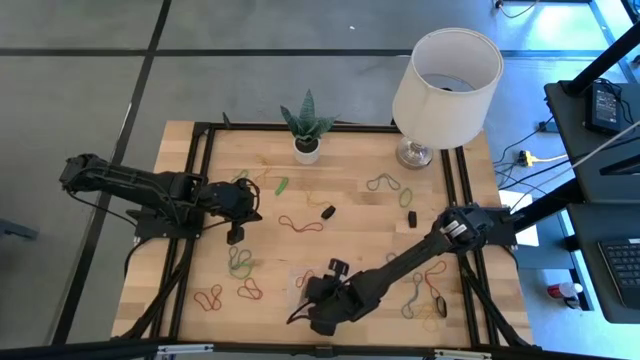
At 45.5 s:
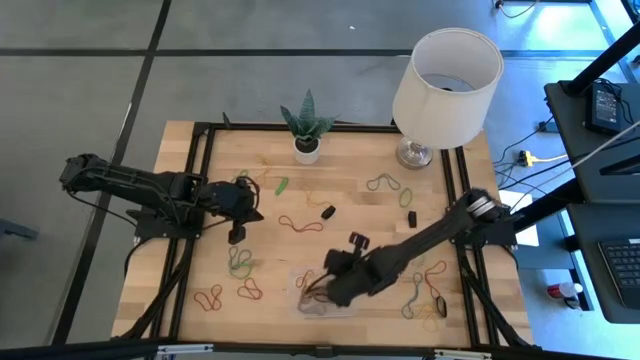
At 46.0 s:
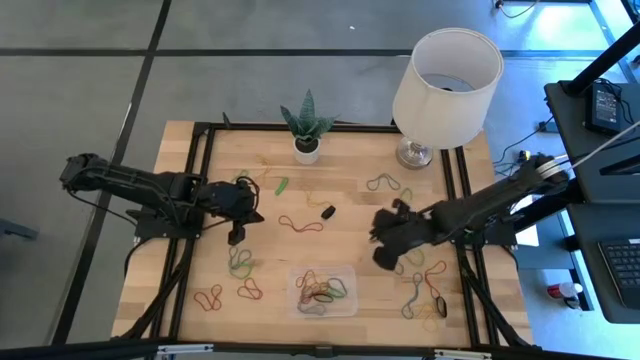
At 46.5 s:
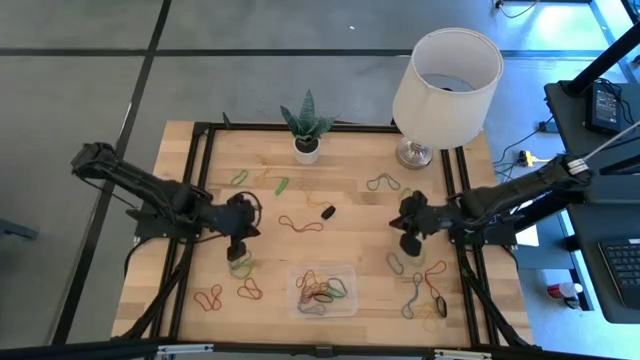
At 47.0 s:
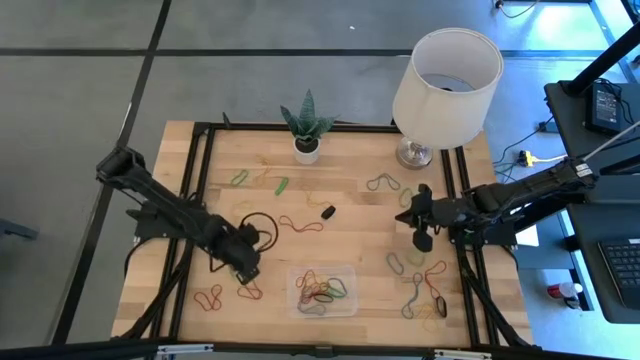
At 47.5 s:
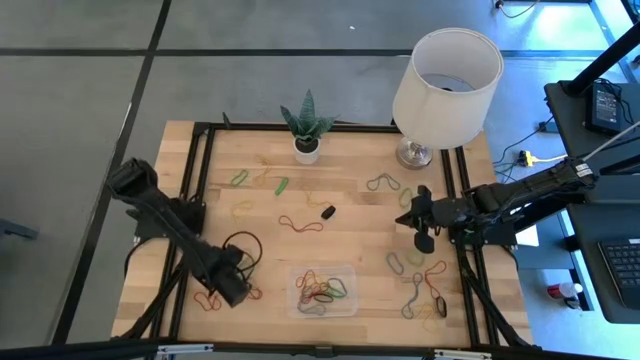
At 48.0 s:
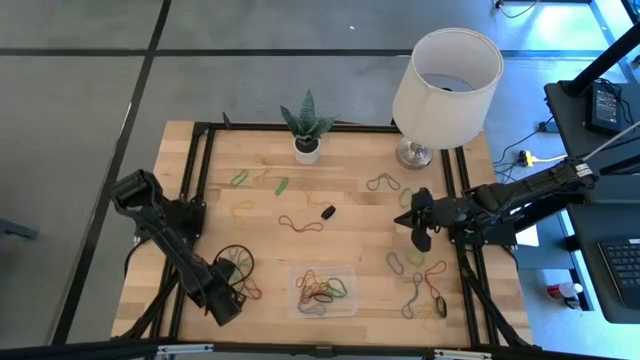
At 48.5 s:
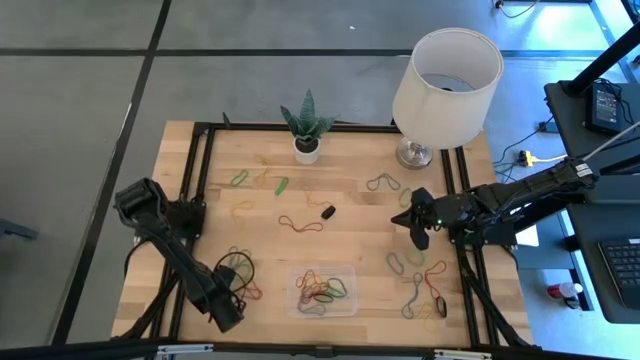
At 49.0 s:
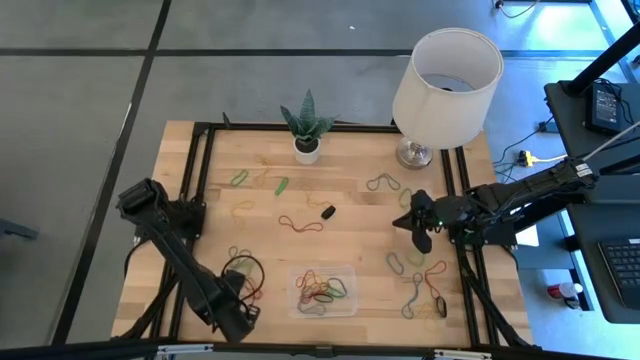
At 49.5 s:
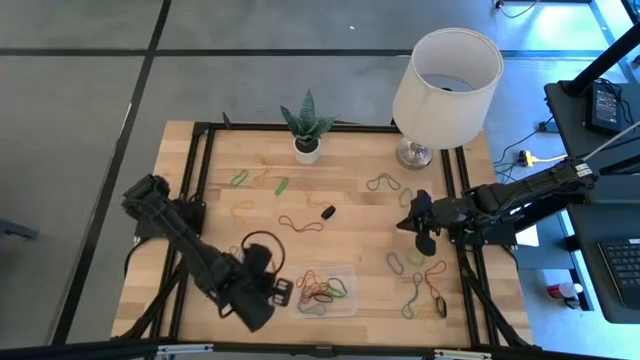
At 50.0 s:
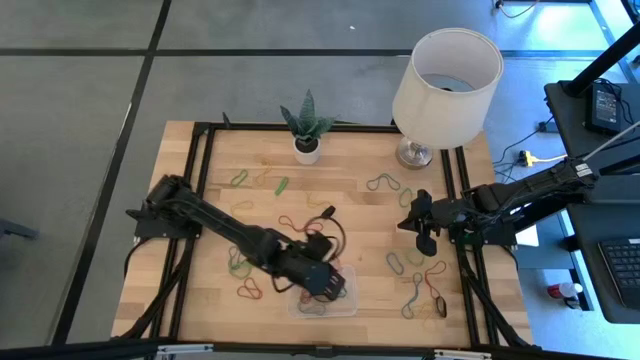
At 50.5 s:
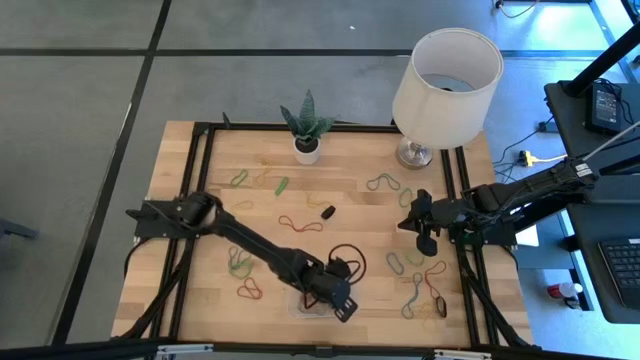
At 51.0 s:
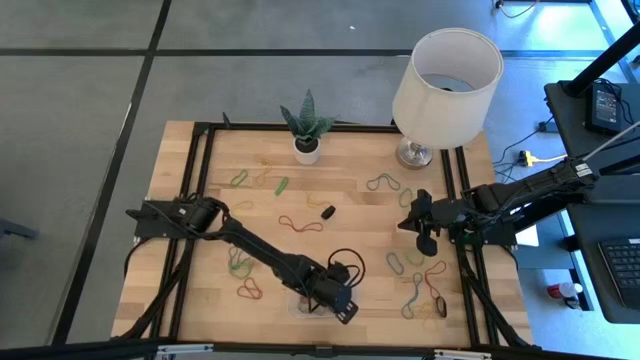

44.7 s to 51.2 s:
Task: Pick and place rubber bands into bin
Put the red rubber band into the transparent bin

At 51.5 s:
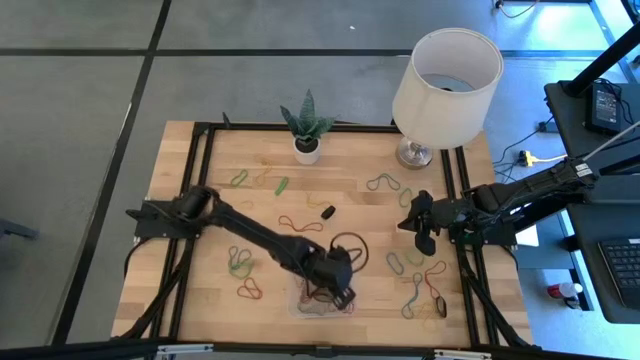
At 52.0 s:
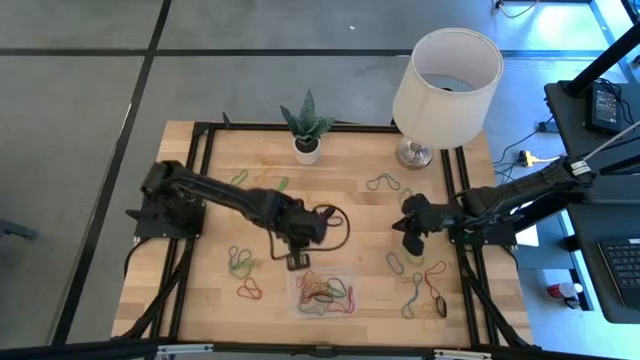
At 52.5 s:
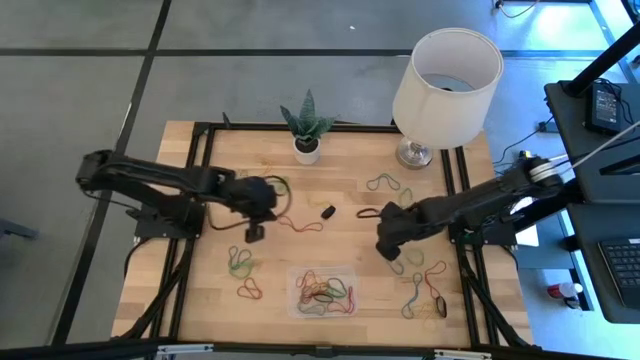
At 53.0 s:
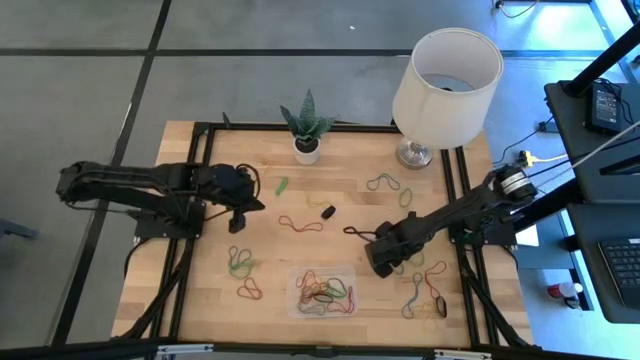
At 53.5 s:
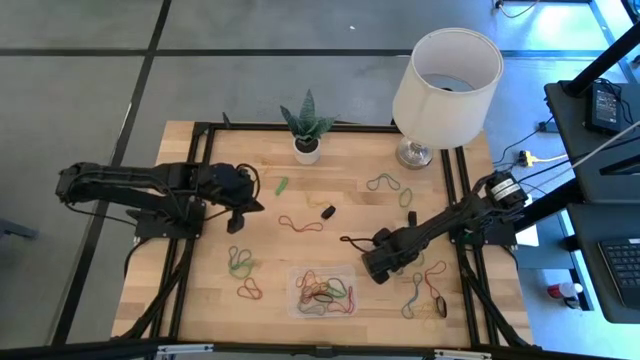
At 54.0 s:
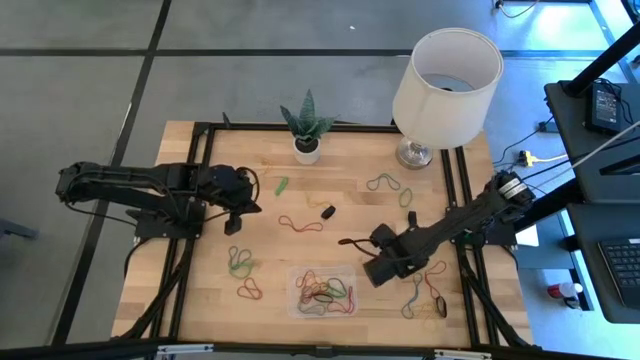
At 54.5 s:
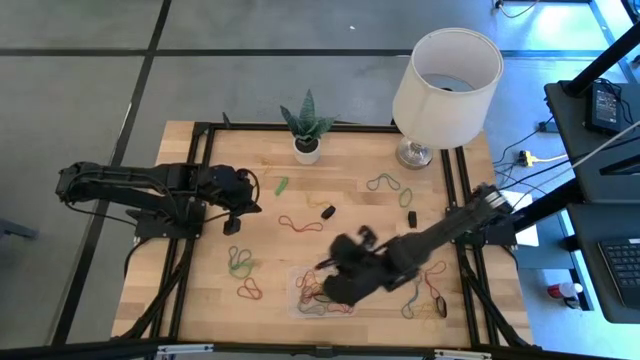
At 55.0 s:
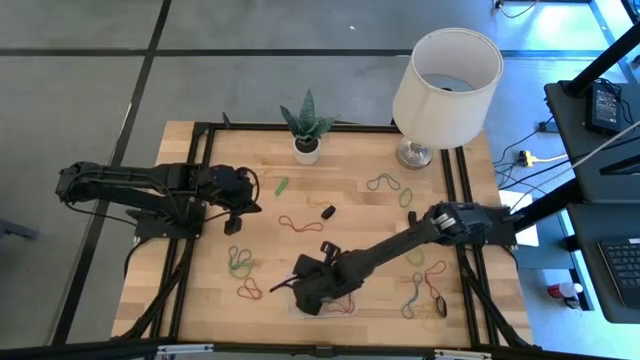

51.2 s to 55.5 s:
Put the blue rubber band into the transparent bin

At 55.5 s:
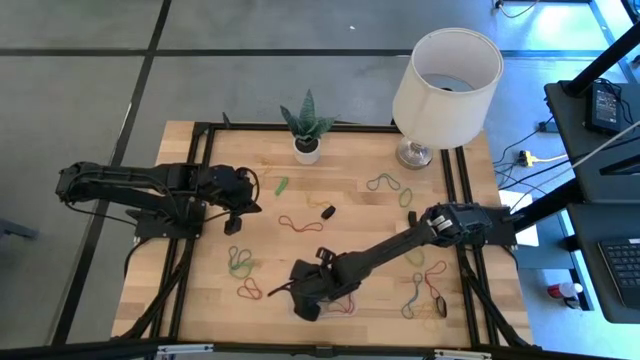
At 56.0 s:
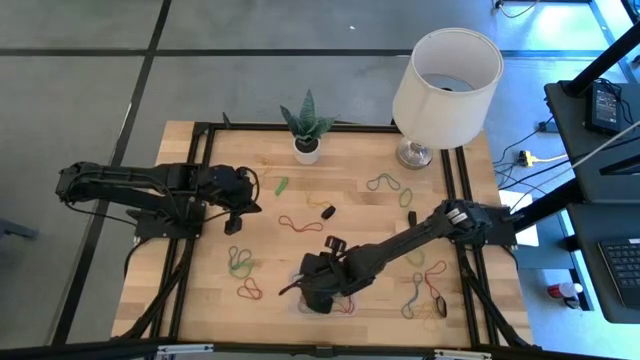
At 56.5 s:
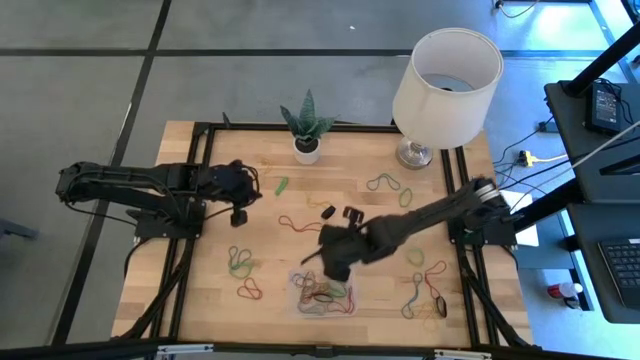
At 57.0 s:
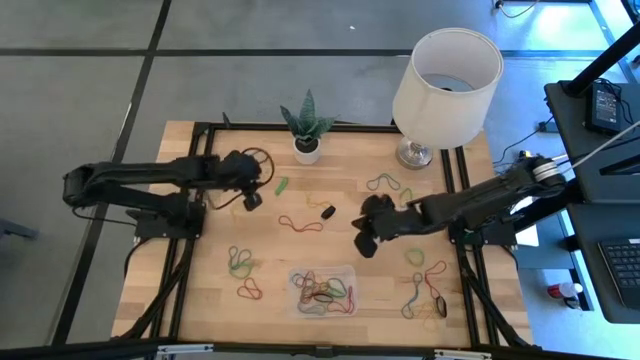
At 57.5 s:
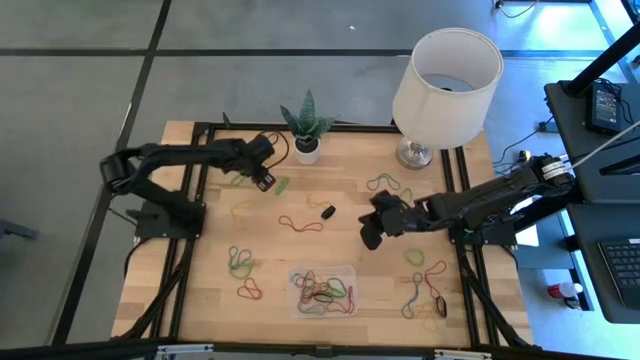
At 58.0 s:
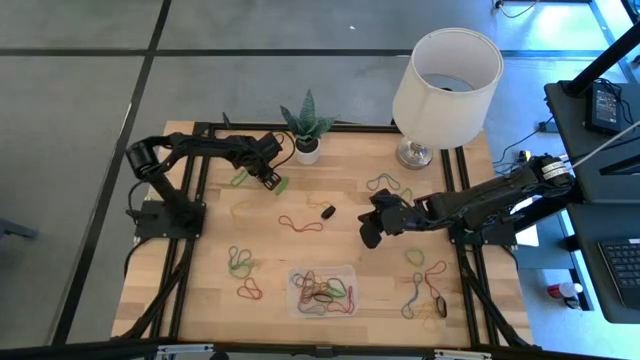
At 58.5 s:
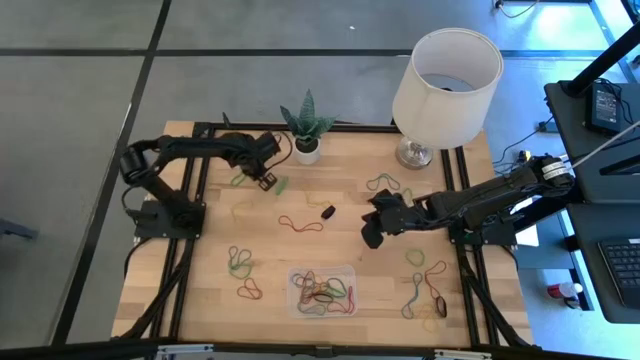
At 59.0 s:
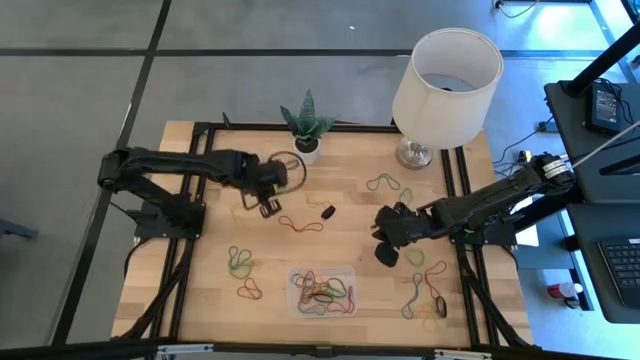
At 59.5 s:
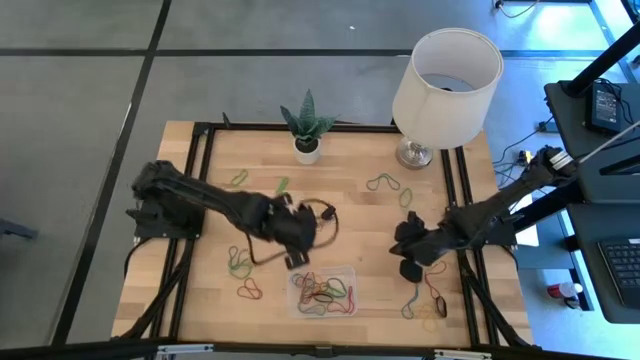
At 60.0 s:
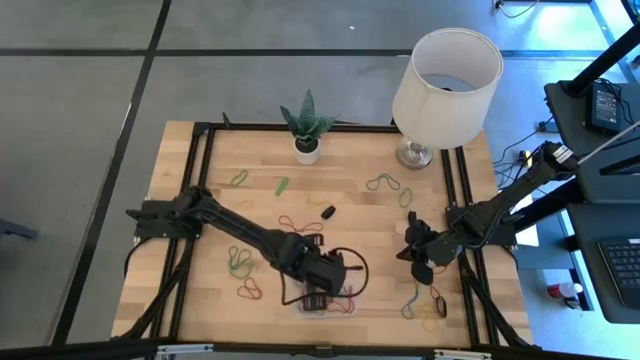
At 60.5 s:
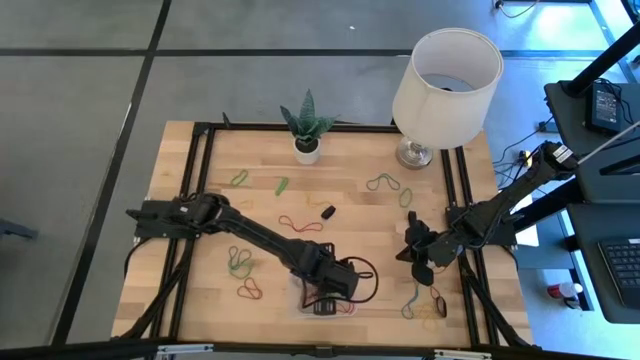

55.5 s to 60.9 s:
Put the yellow rubber band into the transparent bin

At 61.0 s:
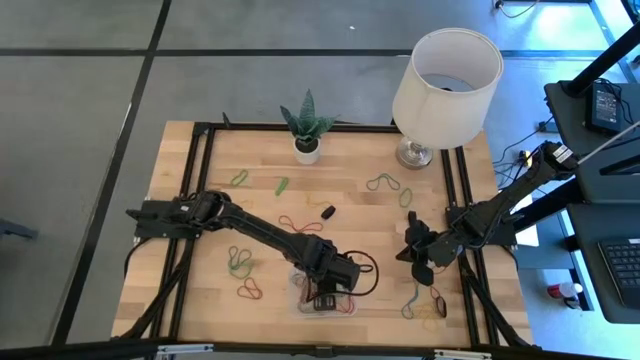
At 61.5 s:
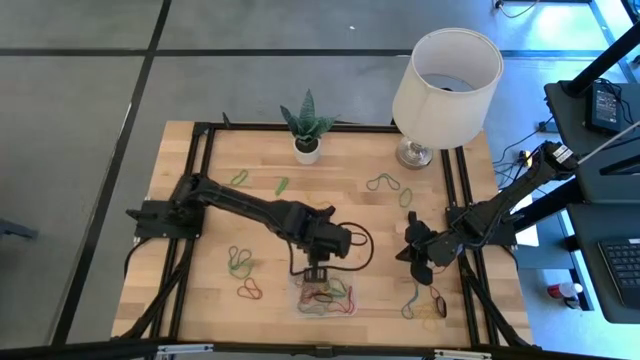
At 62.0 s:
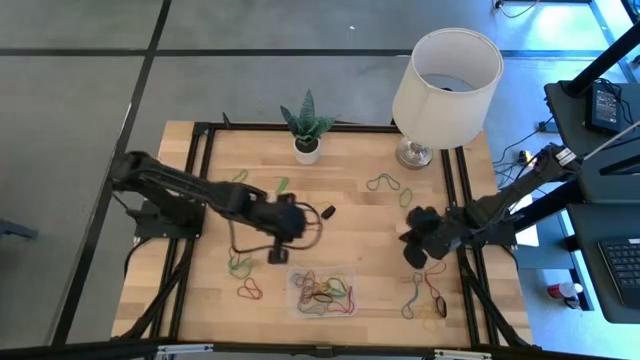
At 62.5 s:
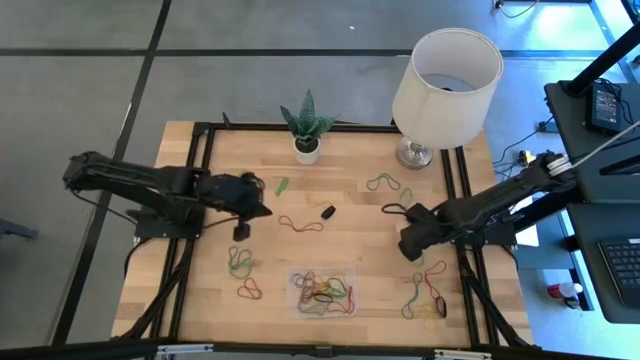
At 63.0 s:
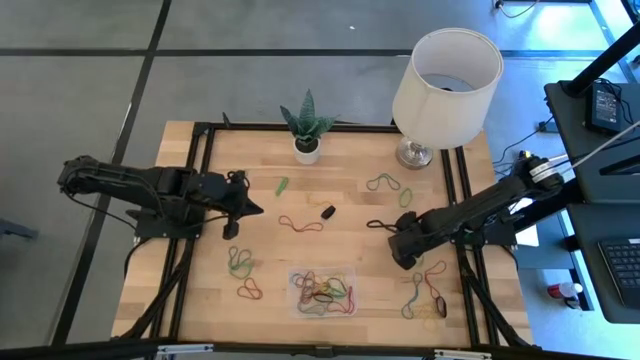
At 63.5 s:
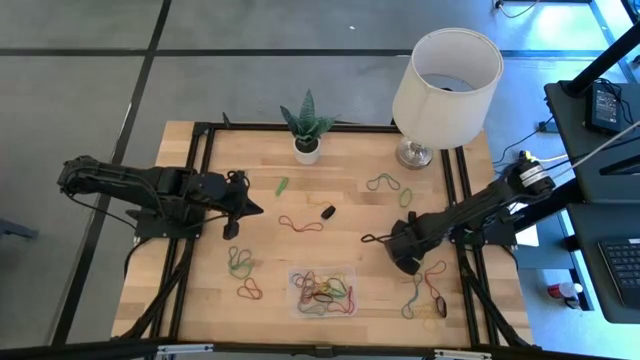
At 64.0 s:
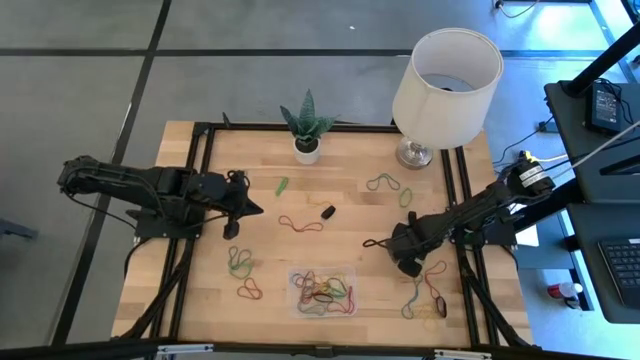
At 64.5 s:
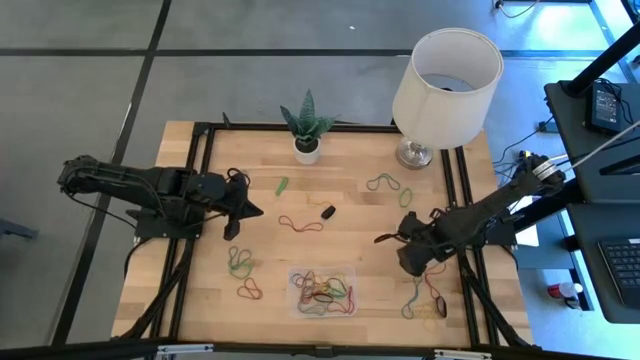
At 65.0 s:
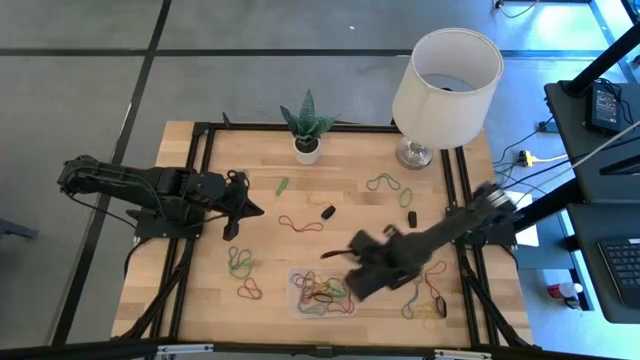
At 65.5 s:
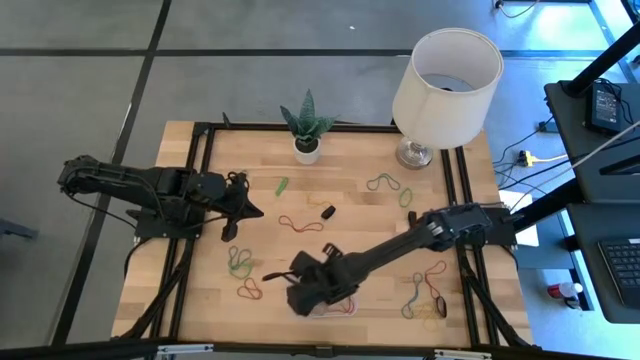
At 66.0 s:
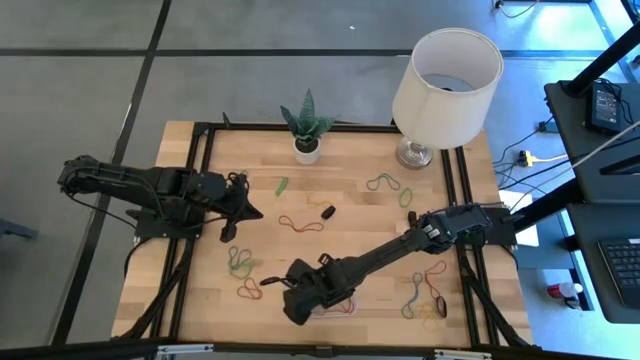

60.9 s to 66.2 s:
Put the green rubber band into the transparent bin
